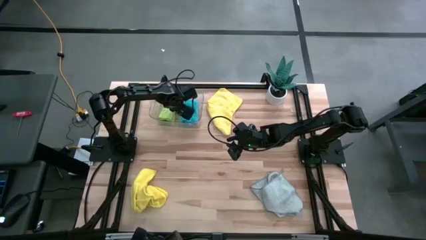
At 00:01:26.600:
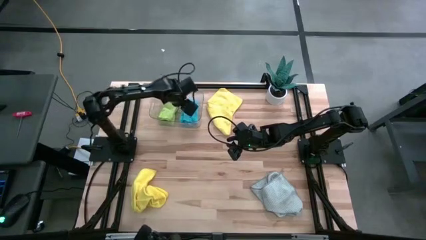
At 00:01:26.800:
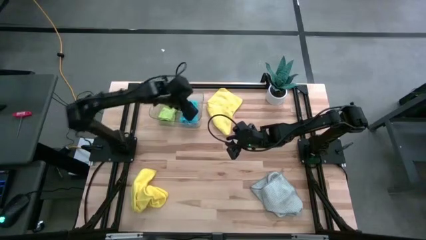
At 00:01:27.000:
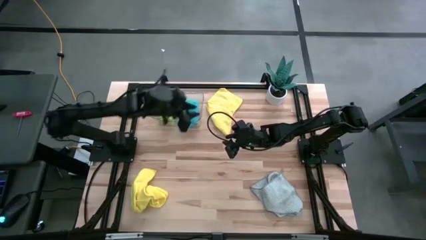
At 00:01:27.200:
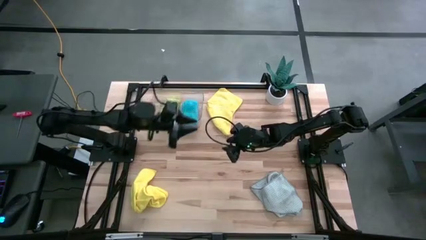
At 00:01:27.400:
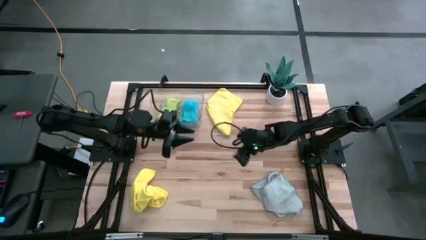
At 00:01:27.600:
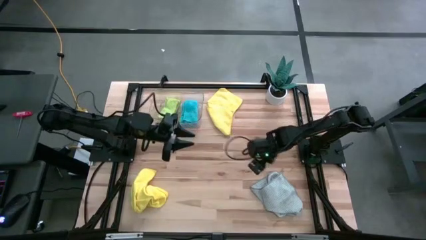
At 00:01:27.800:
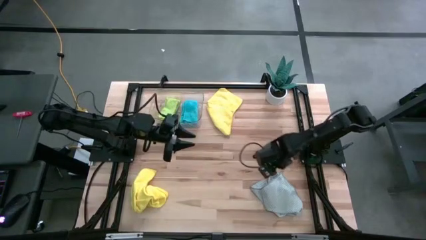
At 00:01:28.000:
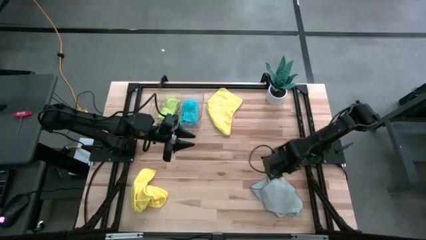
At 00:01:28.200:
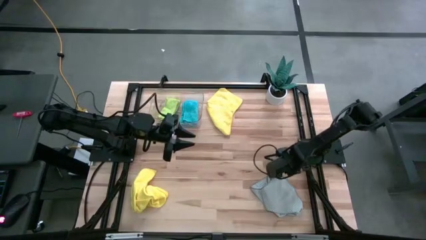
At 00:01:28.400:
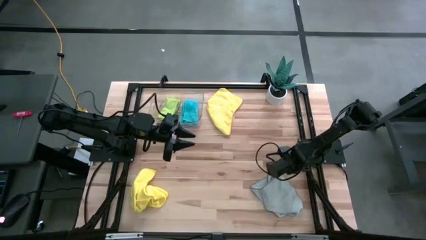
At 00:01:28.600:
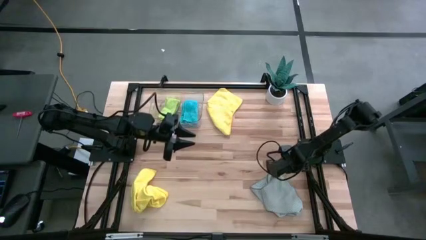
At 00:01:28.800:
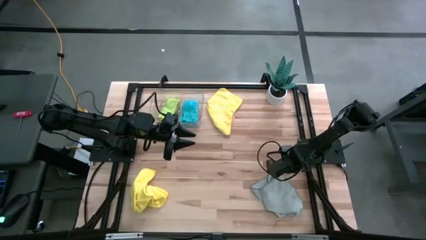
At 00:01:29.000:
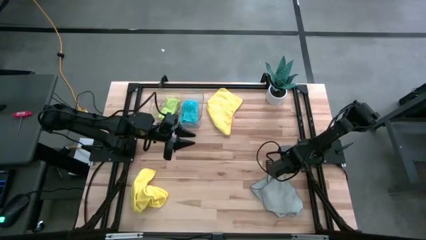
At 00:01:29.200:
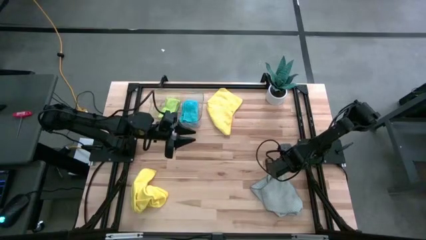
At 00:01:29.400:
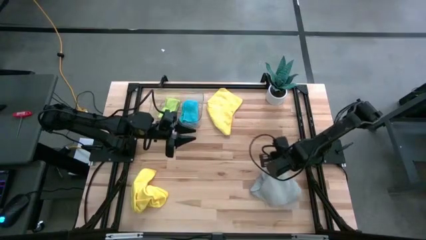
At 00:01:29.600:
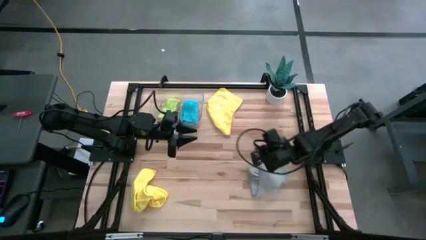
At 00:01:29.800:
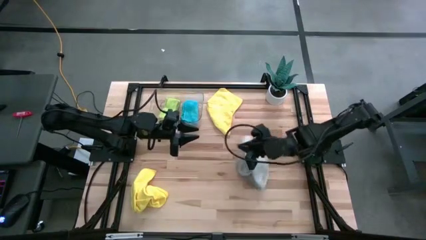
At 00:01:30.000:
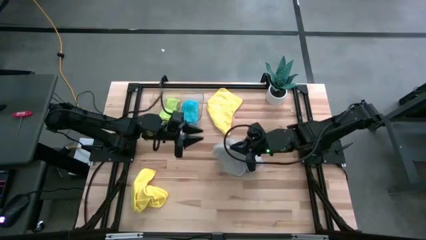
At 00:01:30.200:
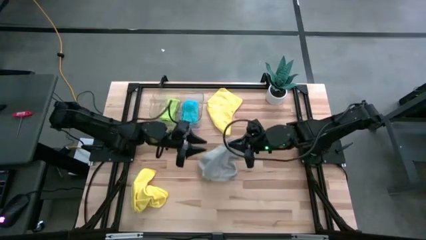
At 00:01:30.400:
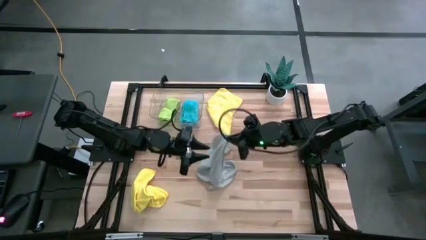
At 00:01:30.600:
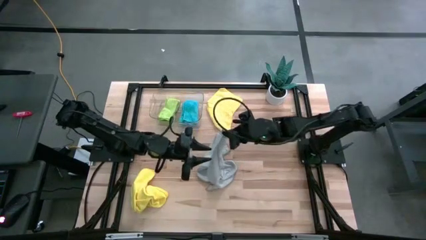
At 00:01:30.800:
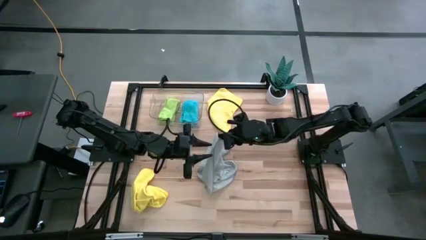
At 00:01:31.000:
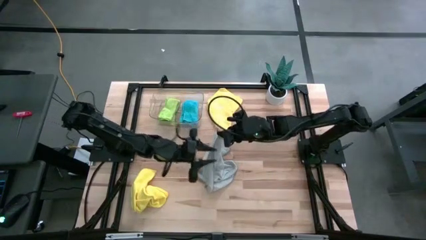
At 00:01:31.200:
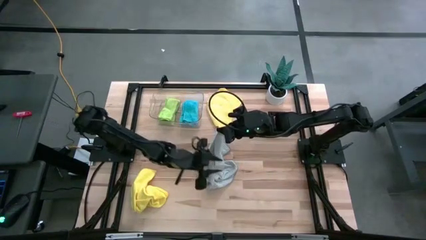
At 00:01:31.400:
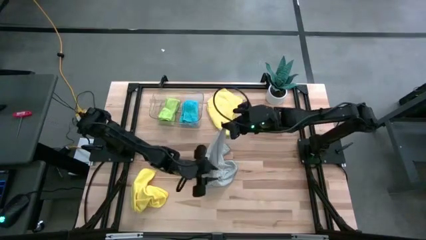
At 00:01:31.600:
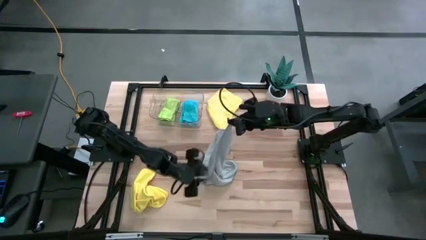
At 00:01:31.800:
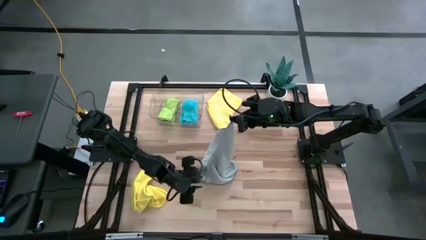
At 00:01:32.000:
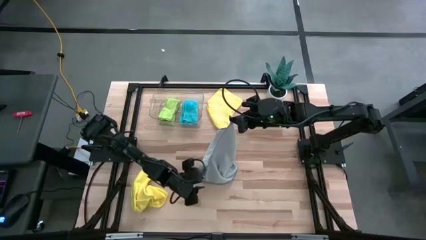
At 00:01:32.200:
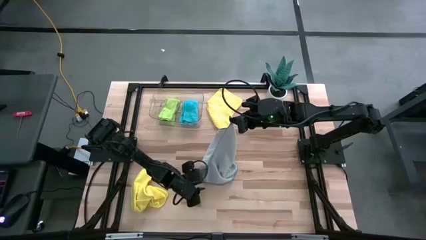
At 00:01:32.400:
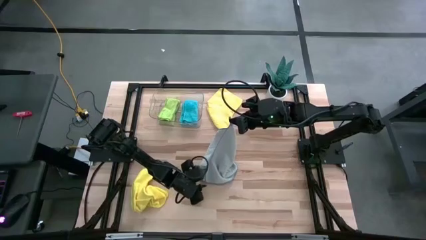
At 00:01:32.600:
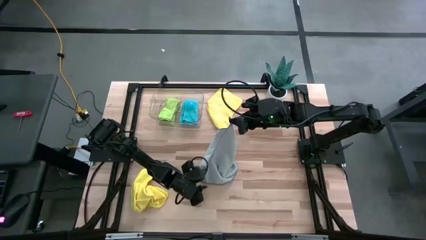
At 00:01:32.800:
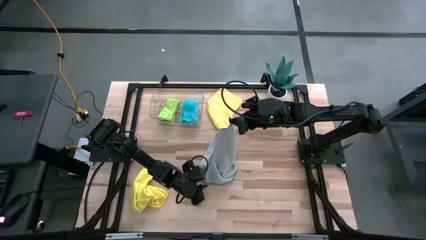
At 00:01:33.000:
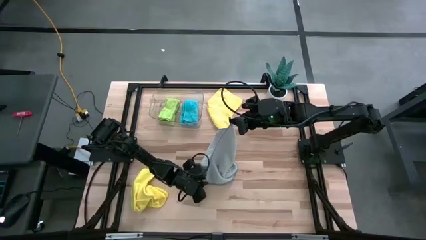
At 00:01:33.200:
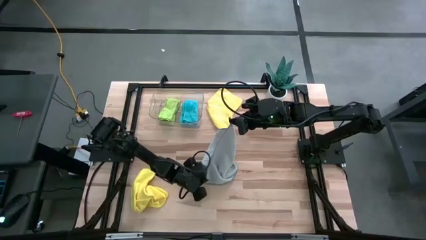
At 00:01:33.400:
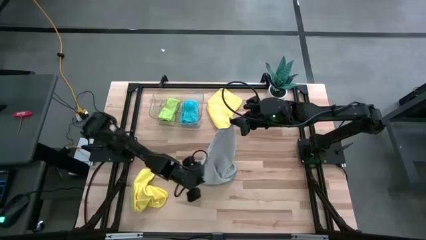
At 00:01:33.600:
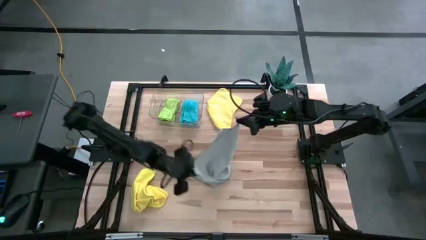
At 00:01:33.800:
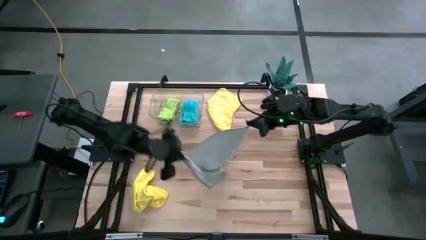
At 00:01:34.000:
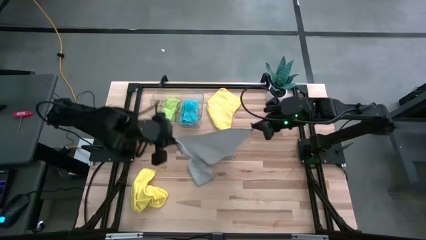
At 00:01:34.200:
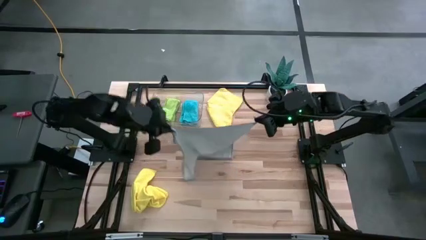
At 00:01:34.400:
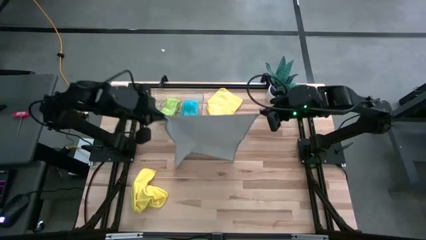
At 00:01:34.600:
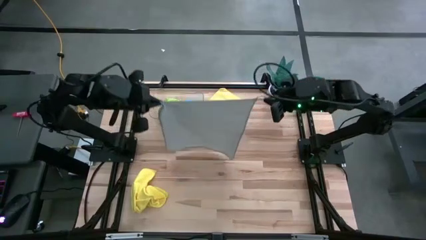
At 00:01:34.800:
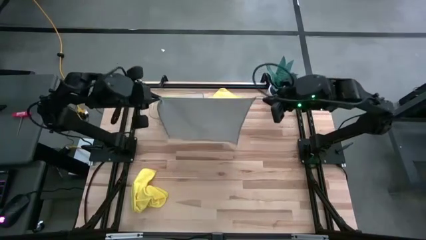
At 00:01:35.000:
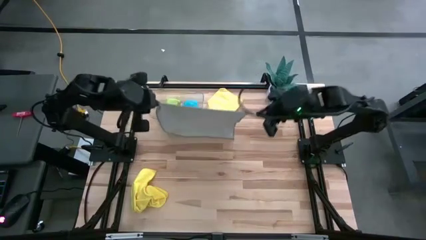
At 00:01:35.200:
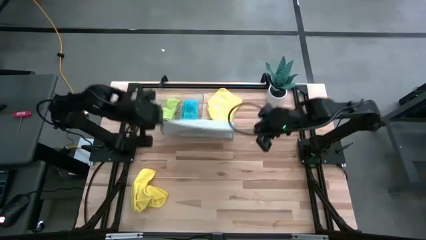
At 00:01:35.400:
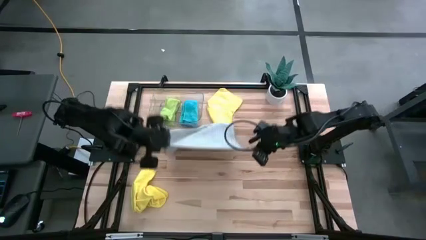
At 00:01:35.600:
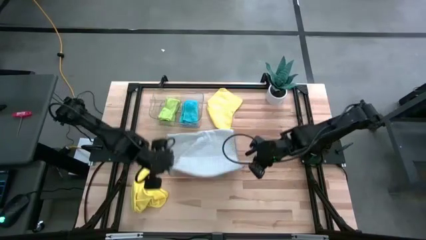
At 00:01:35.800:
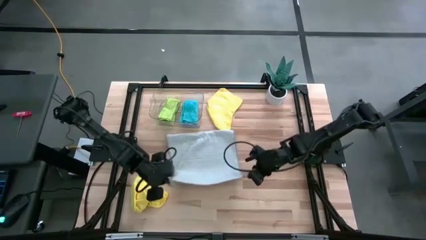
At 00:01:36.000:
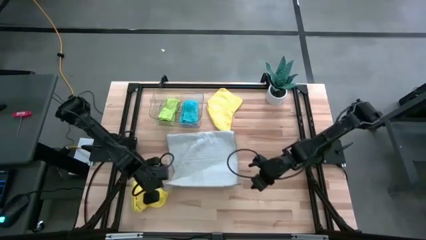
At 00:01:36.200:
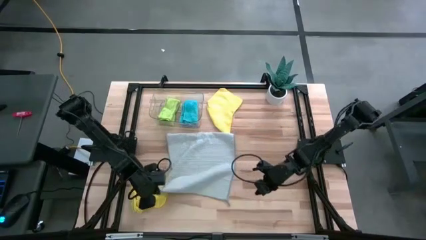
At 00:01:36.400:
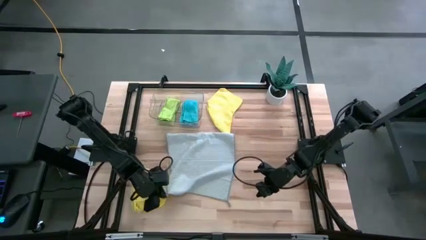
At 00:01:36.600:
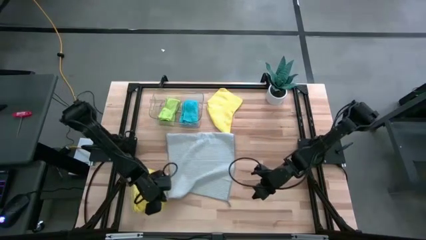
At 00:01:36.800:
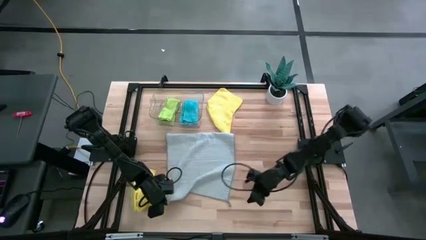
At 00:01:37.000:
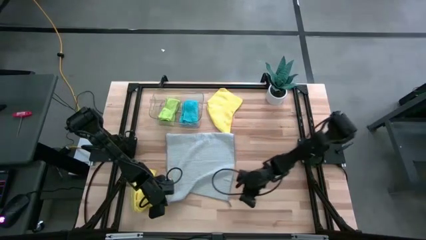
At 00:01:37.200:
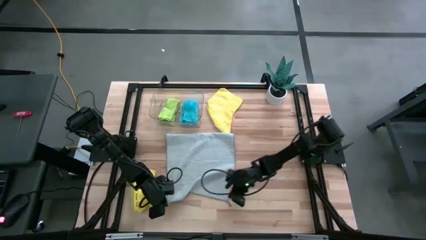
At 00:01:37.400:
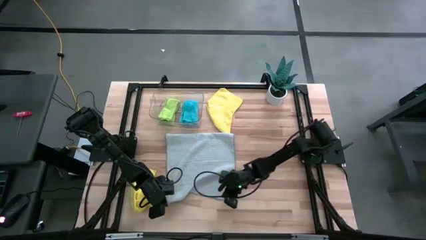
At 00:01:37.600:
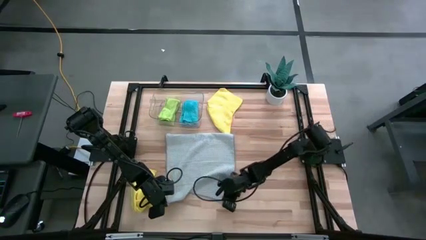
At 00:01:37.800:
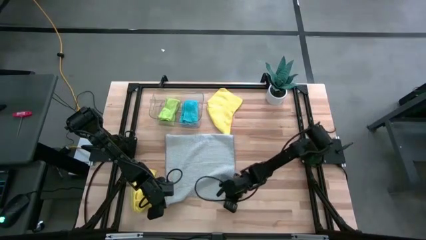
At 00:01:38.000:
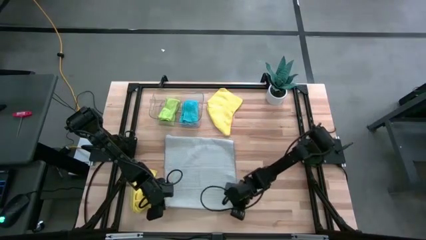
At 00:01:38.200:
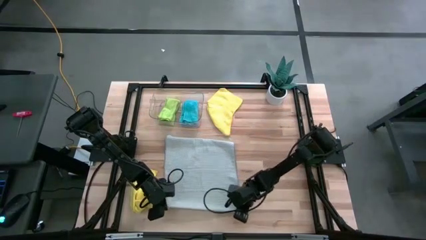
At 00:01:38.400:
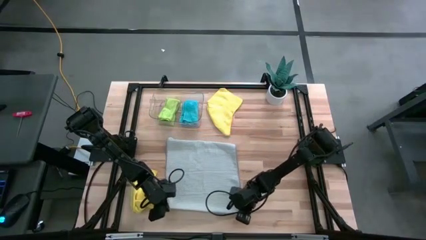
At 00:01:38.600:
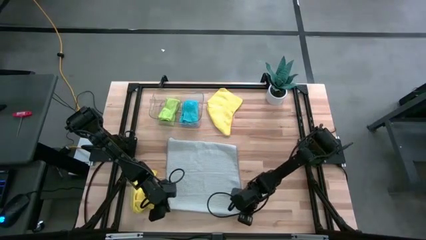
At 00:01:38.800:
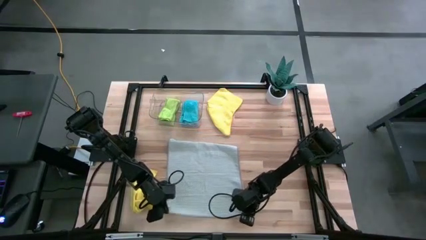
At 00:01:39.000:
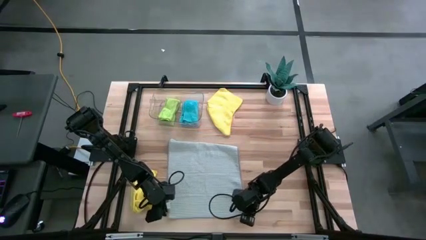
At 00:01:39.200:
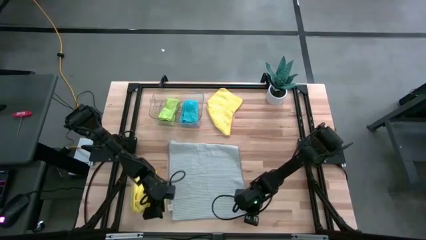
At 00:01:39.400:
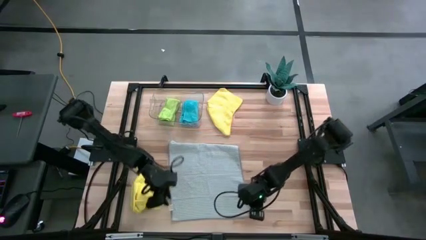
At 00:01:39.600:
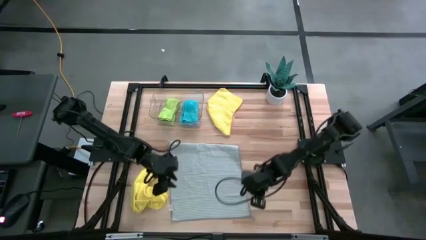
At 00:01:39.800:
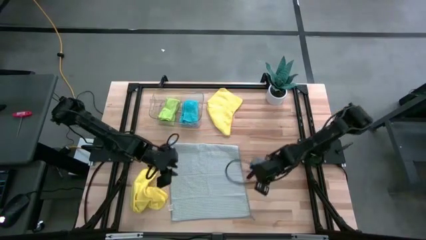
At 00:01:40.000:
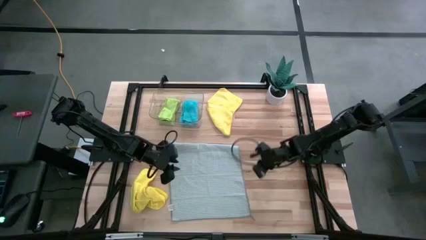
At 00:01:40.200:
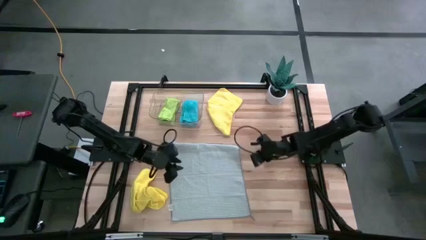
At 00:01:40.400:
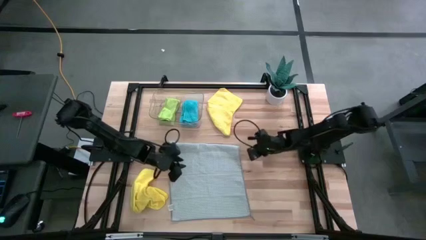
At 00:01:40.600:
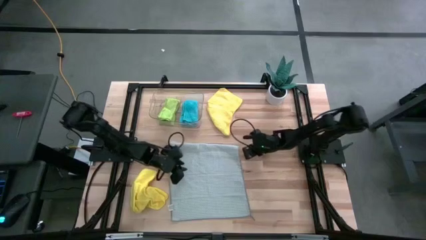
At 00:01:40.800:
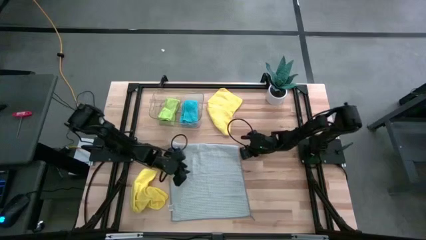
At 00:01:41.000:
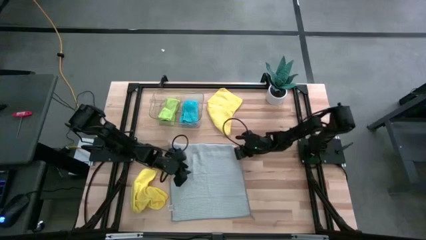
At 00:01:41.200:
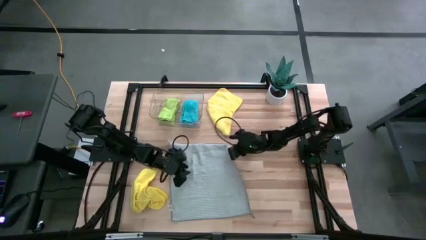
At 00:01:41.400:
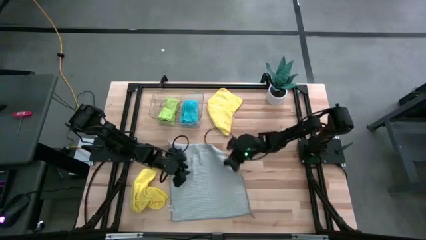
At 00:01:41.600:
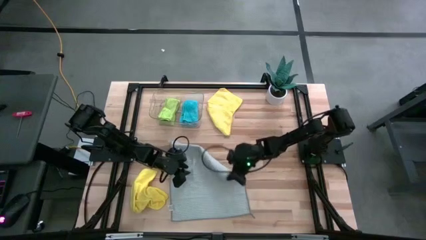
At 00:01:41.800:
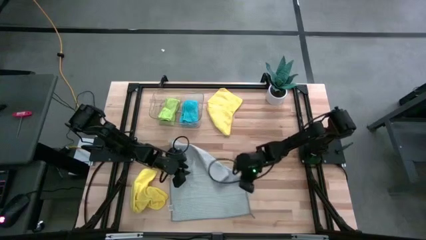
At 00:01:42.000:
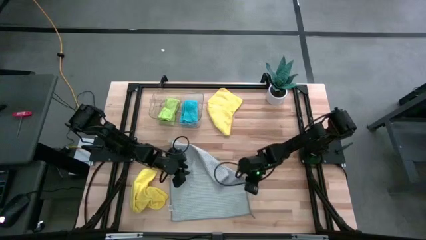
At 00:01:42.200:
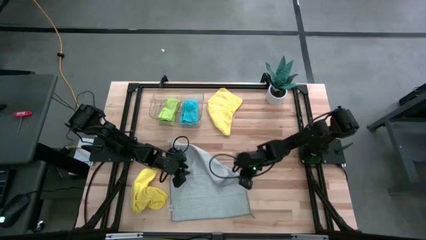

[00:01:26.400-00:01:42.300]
Task: Fold microfiber towels
Fold the gray towel
